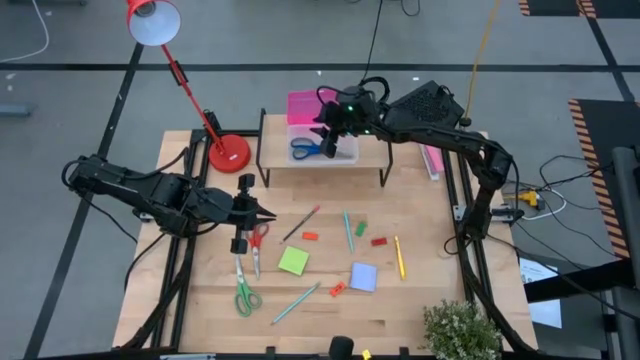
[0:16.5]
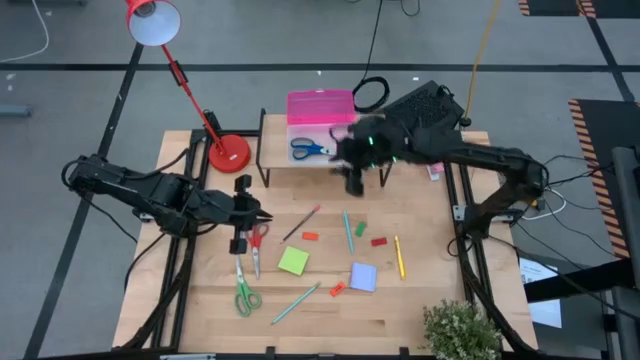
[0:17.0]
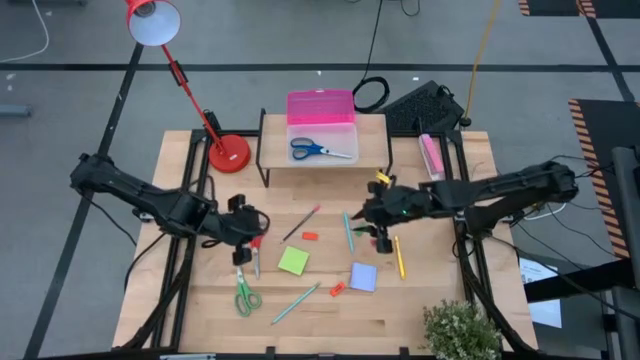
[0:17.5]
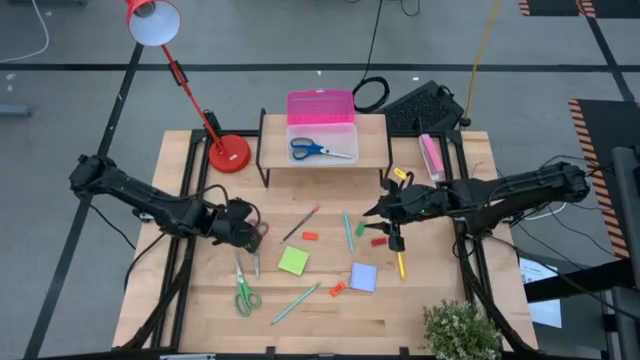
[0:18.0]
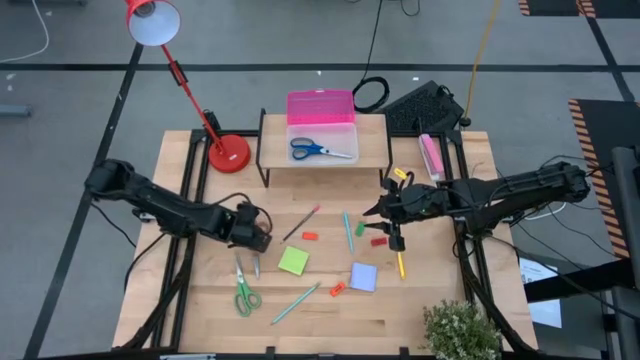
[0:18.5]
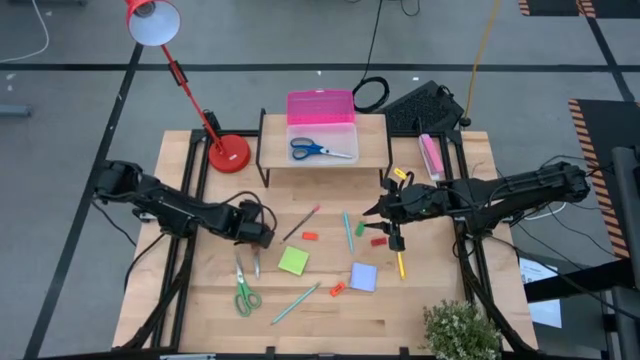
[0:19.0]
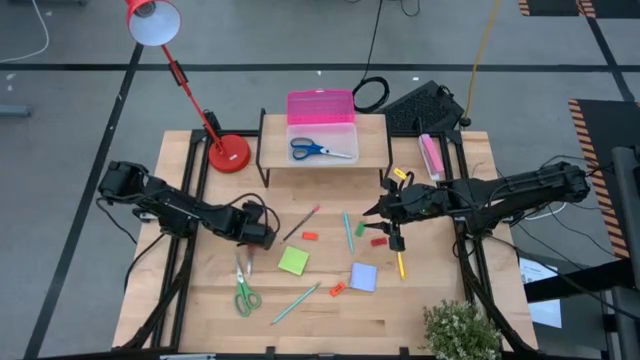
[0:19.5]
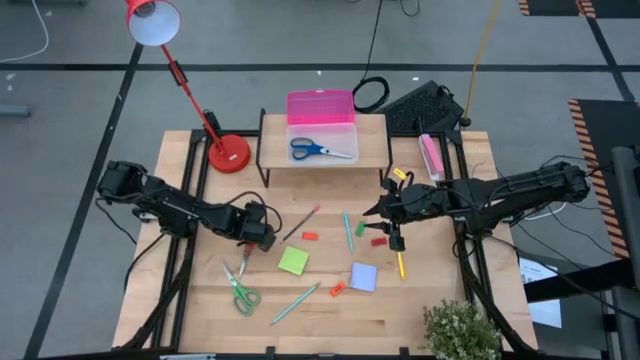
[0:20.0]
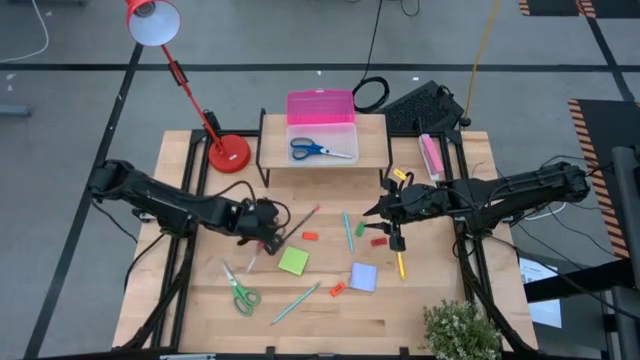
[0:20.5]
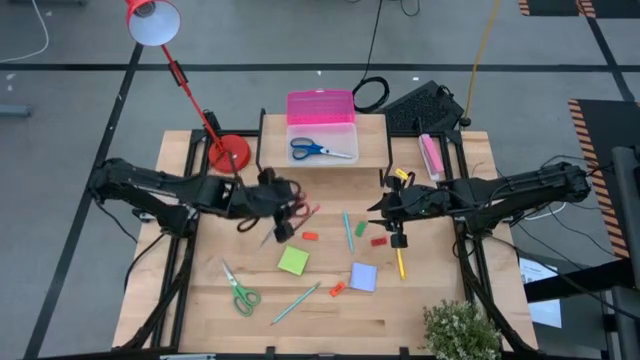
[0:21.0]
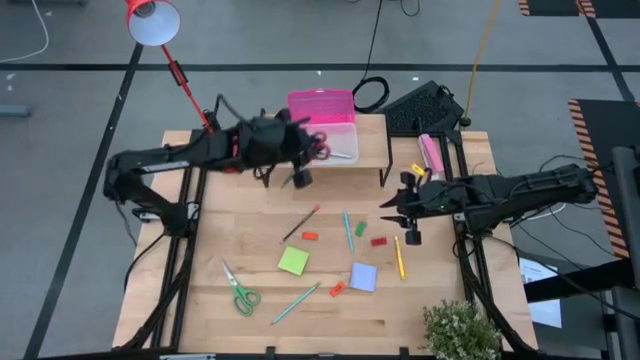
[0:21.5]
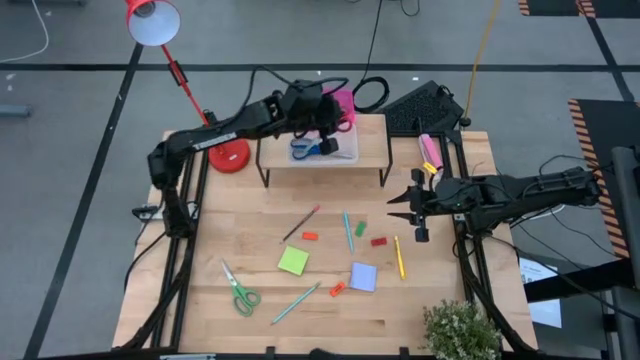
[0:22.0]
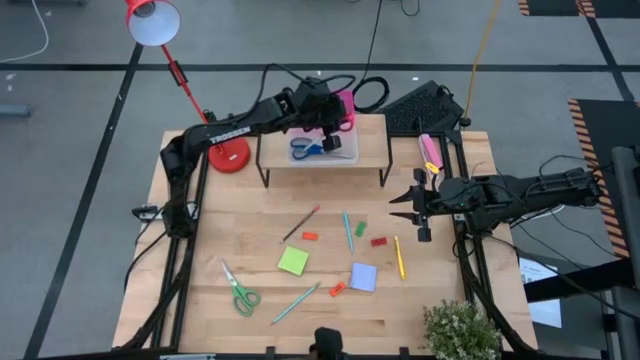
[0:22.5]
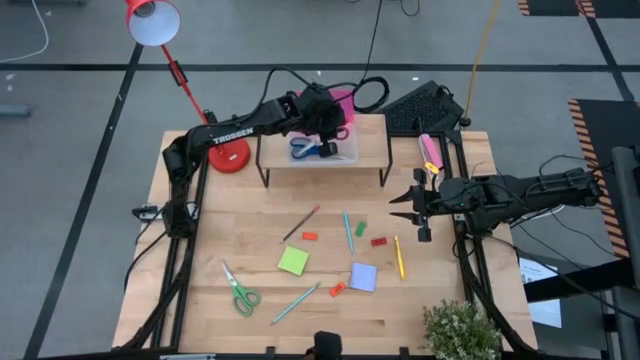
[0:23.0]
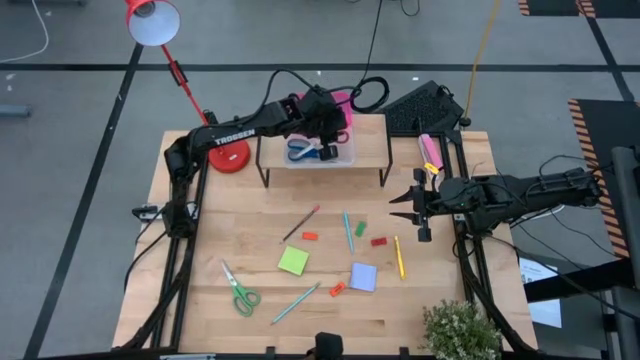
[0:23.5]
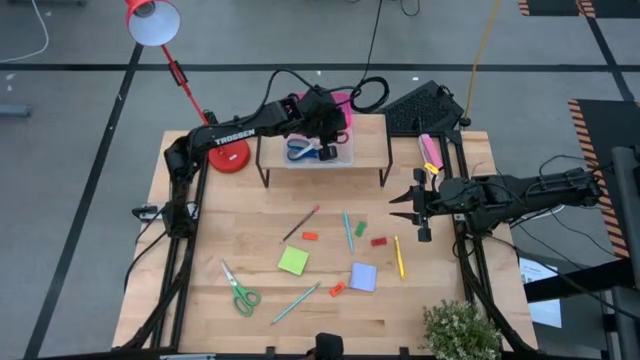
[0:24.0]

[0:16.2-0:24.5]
Task: Pack school essentials
Put the red scissors into the pink supply box on the shelf

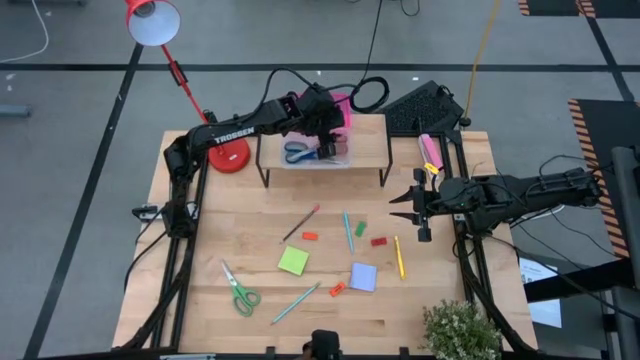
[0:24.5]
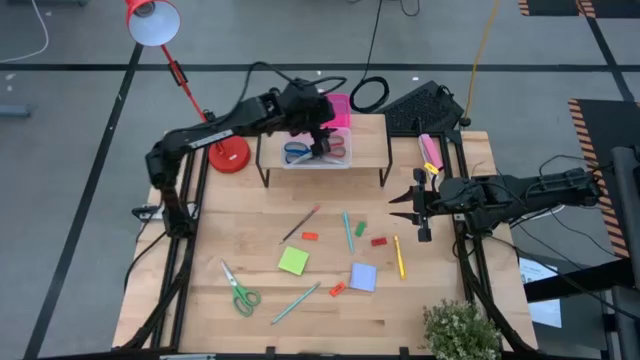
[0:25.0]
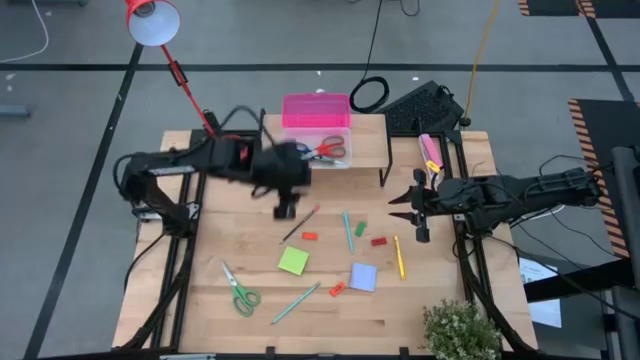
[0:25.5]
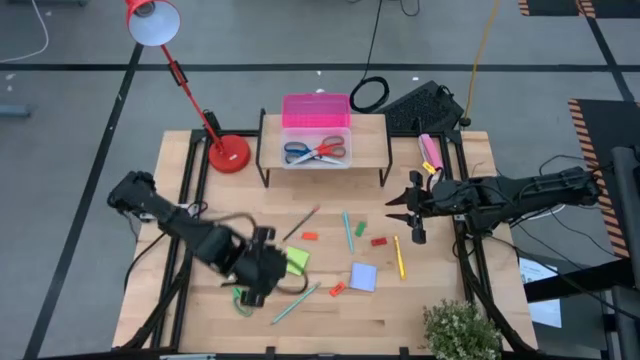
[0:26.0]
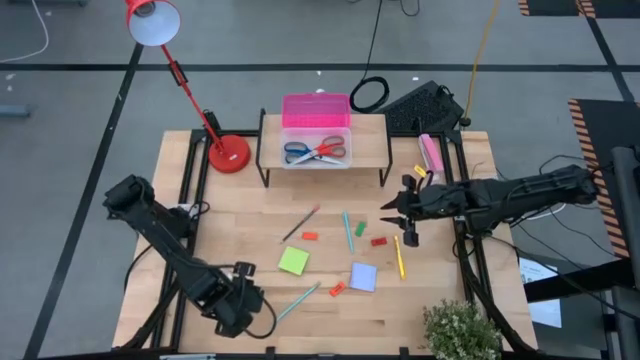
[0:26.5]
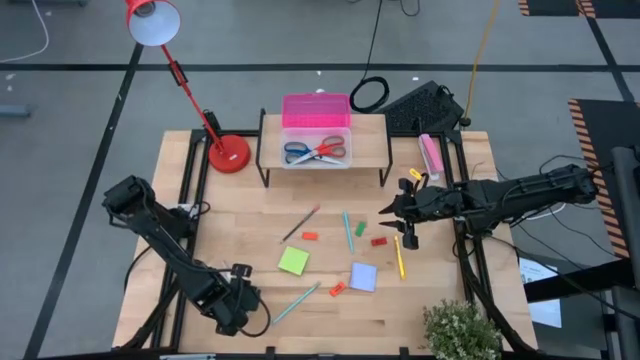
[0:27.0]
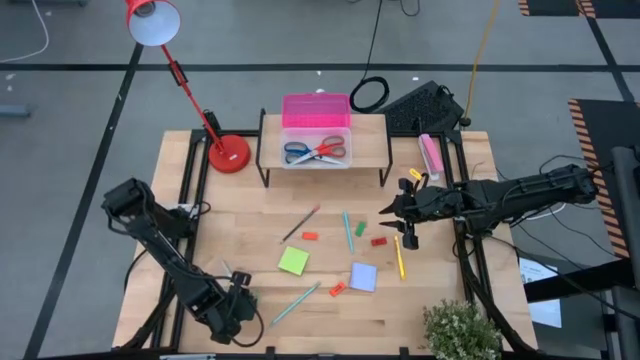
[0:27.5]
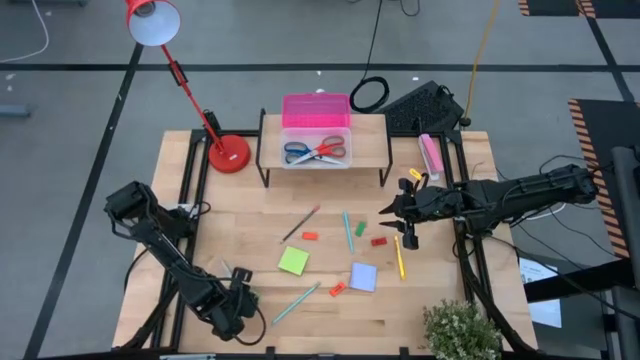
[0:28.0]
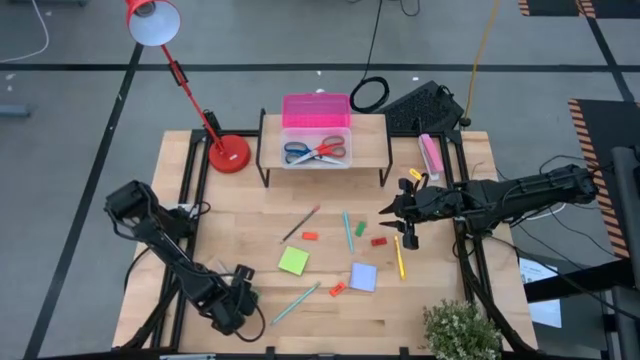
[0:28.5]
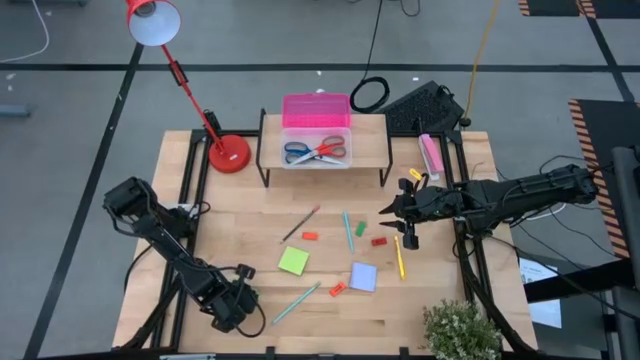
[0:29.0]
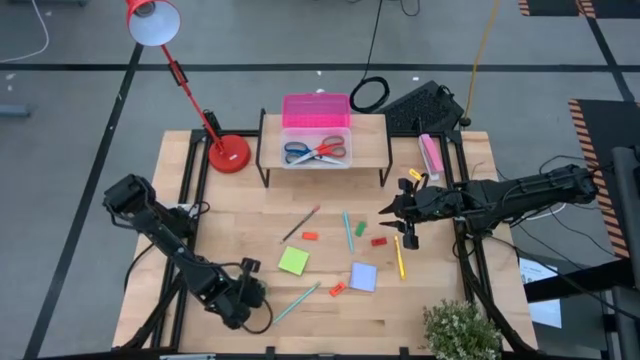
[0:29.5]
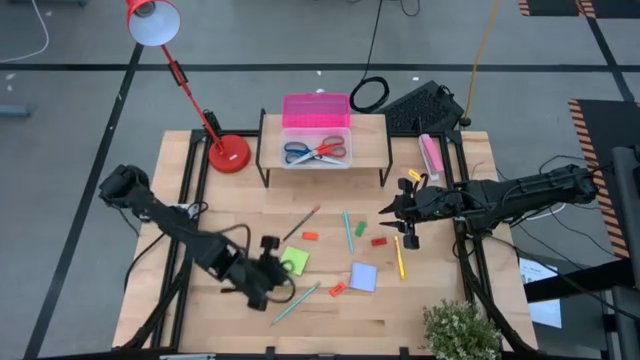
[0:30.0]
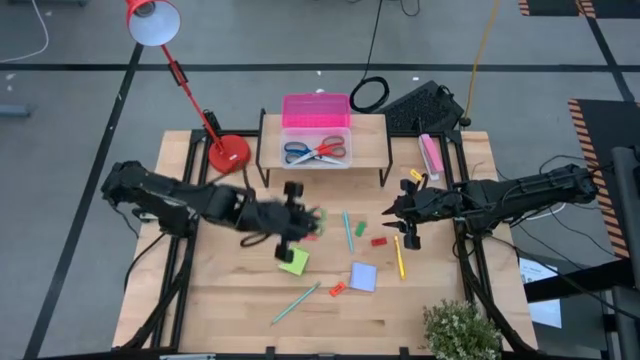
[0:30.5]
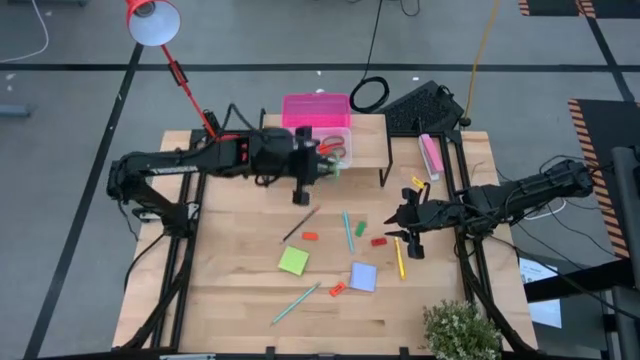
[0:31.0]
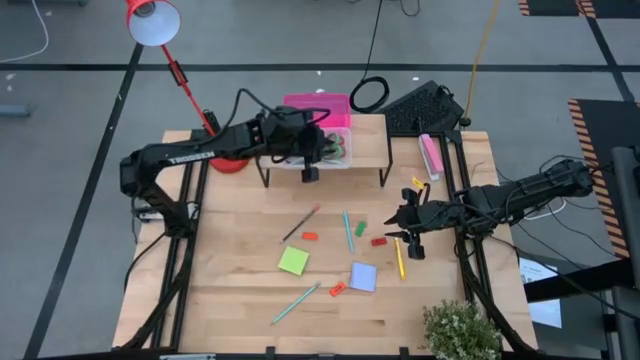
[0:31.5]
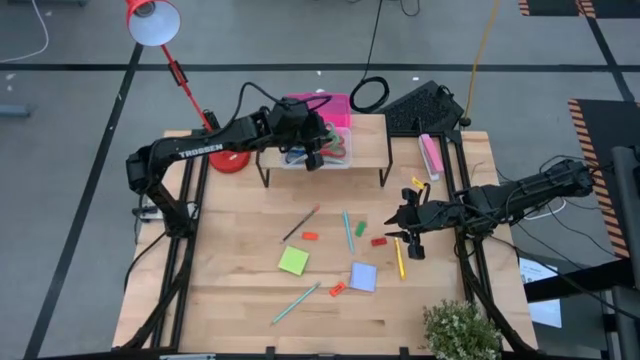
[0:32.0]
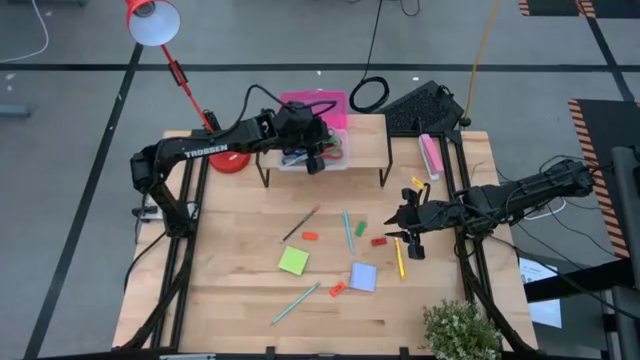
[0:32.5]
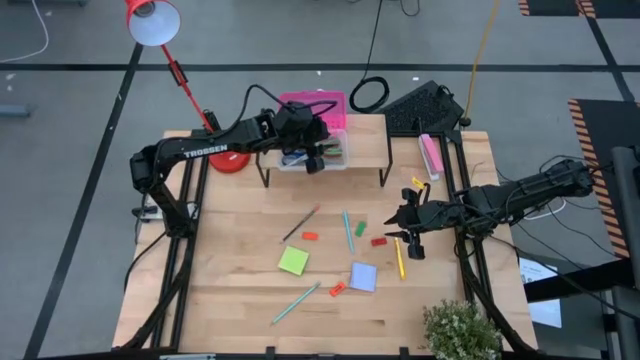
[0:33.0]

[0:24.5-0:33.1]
Put the green scissors into the pink supply box on the shelf

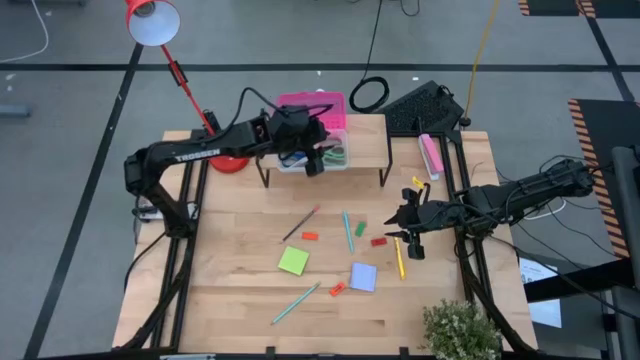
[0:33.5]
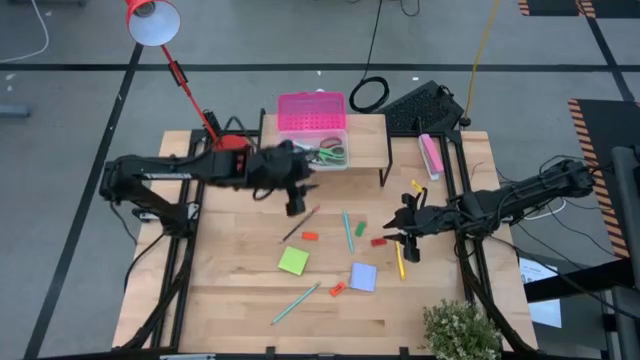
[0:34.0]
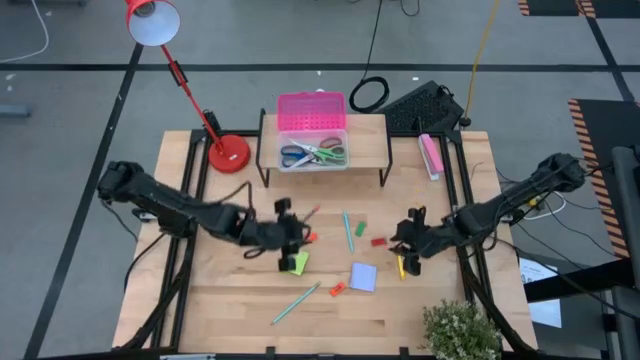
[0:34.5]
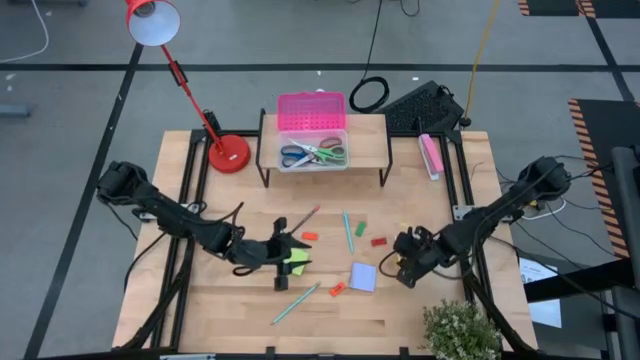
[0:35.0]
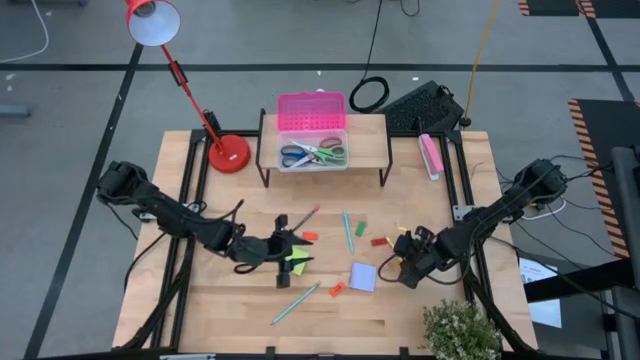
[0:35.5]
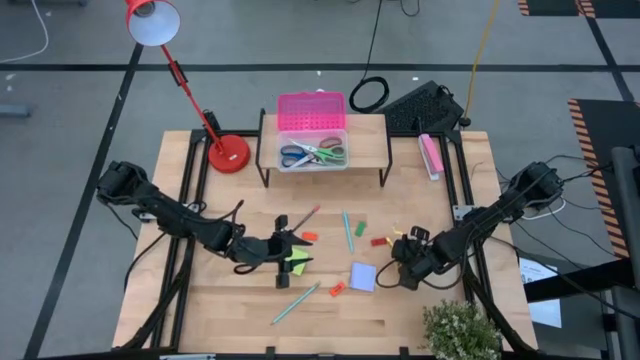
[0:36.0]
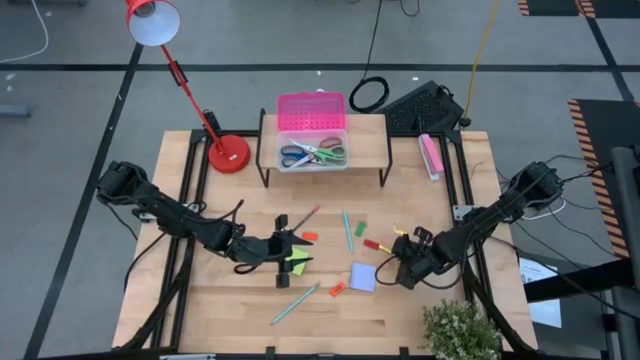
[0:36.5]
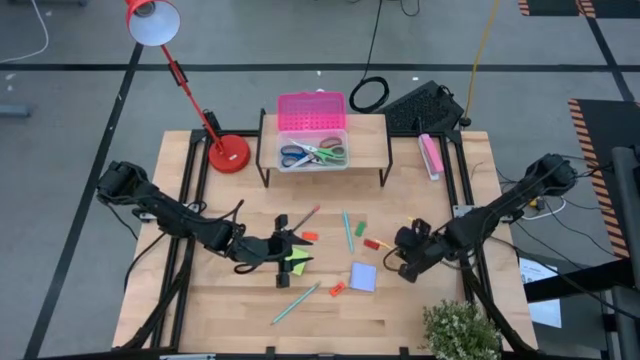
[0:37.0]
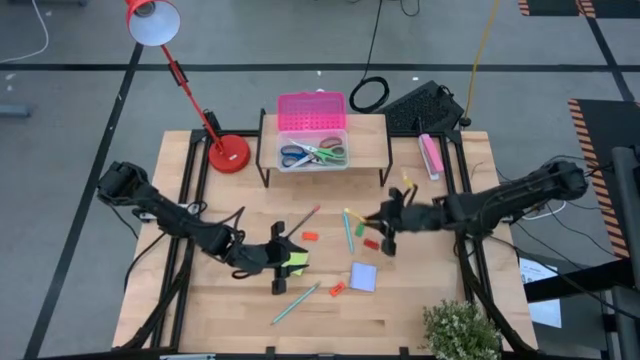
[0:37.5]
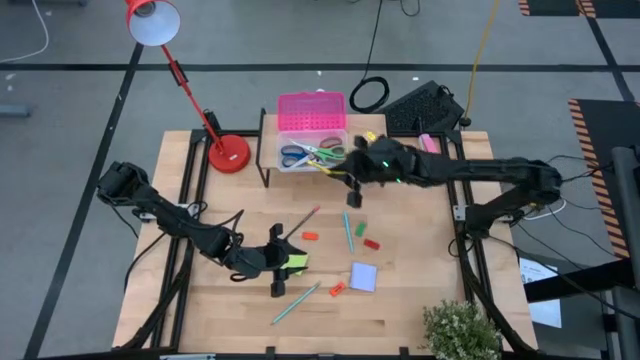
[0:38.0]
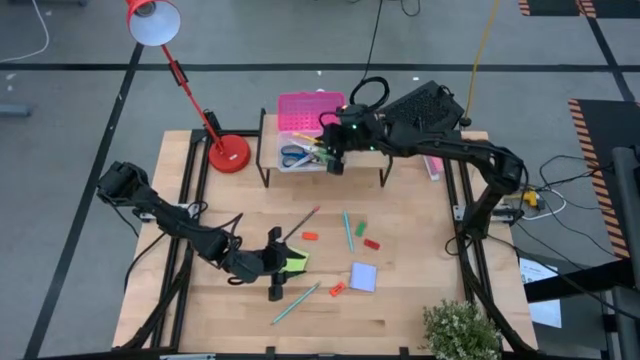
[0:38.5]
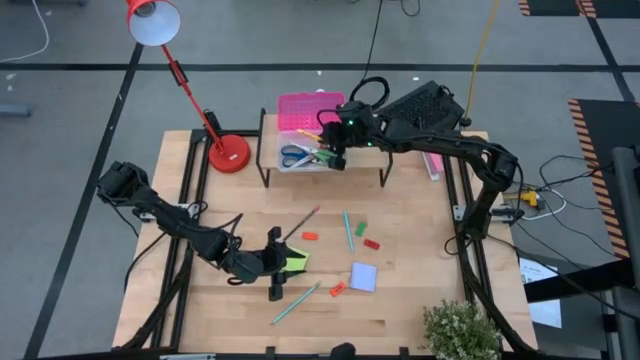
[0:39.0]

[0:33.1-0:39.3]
Put the yellow pen into the pink supply box on the shelf
